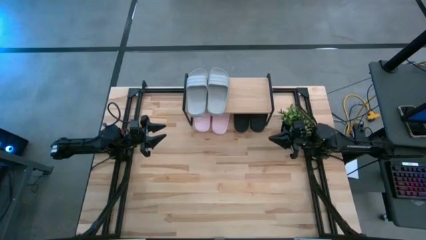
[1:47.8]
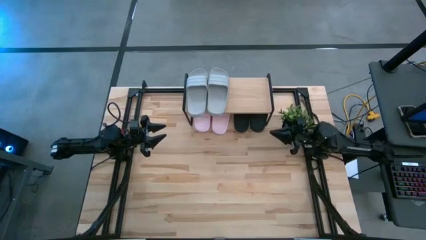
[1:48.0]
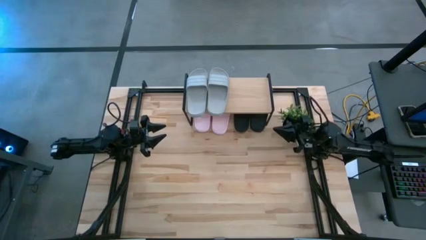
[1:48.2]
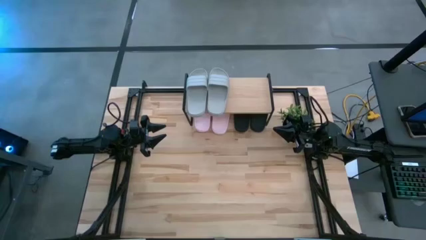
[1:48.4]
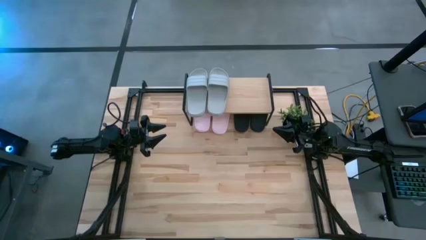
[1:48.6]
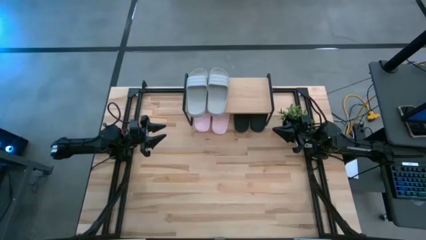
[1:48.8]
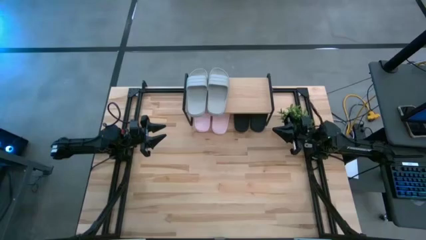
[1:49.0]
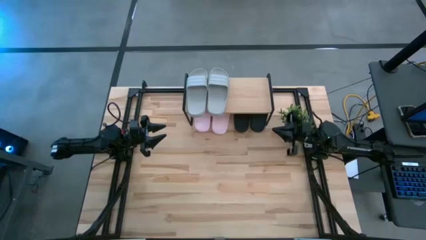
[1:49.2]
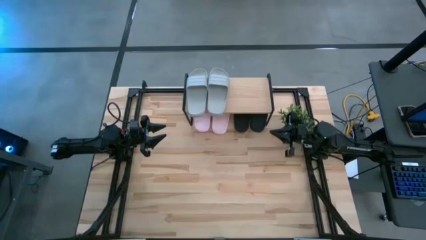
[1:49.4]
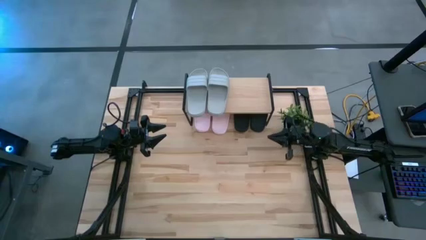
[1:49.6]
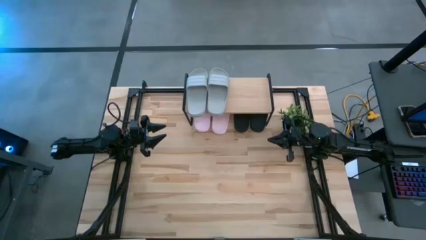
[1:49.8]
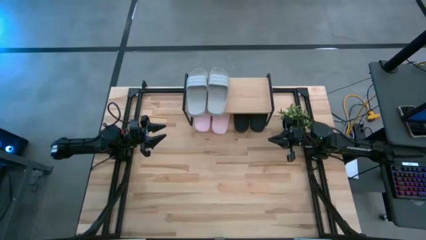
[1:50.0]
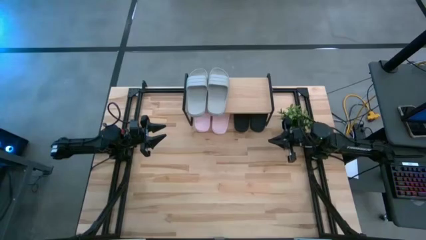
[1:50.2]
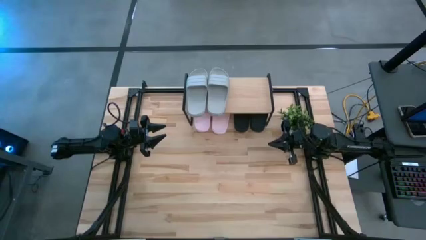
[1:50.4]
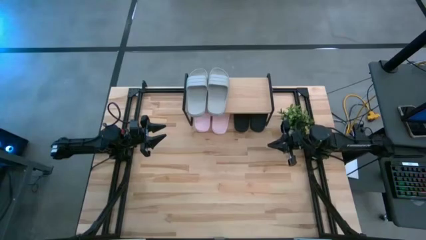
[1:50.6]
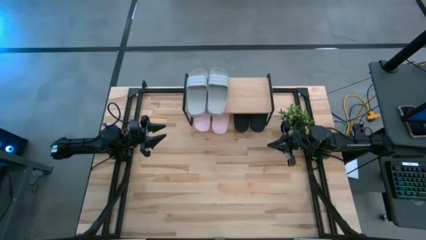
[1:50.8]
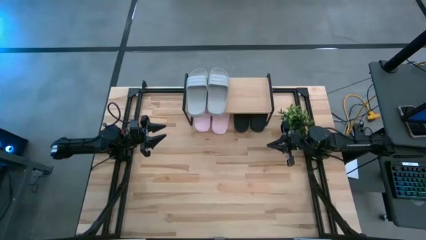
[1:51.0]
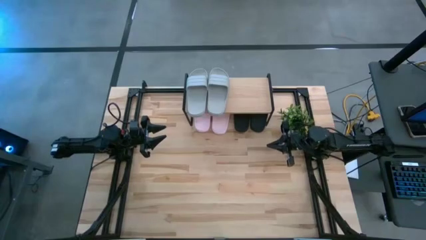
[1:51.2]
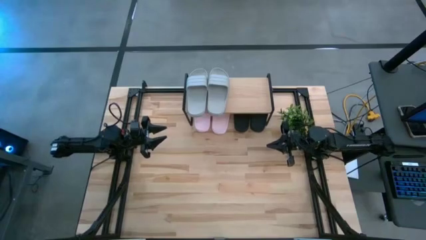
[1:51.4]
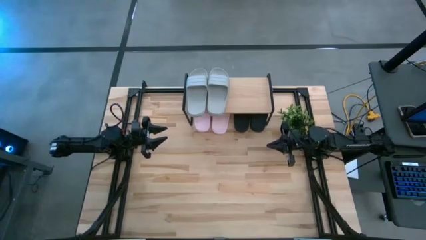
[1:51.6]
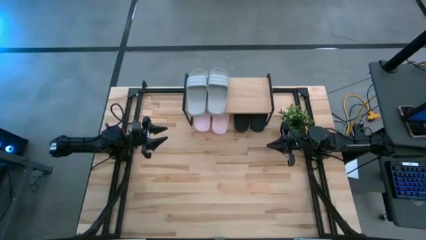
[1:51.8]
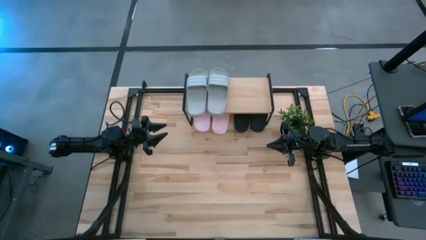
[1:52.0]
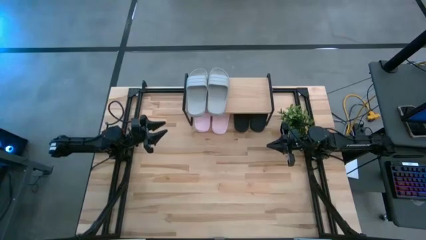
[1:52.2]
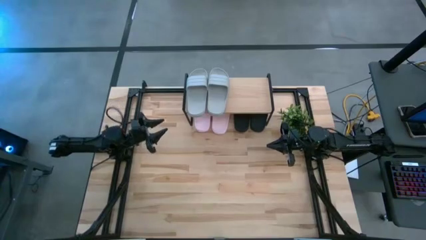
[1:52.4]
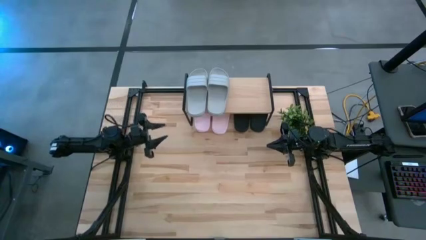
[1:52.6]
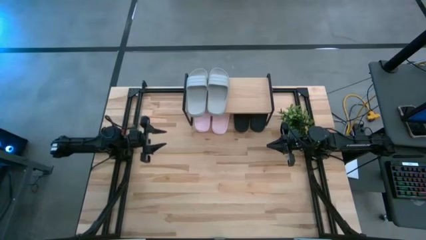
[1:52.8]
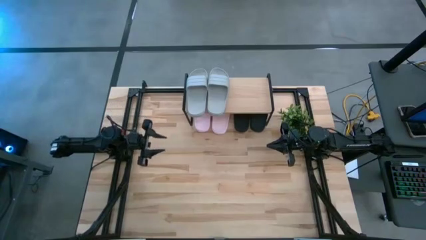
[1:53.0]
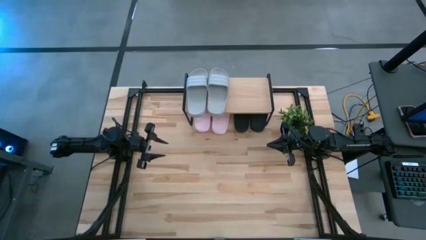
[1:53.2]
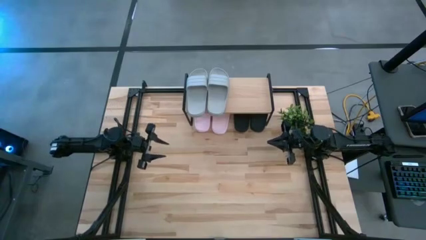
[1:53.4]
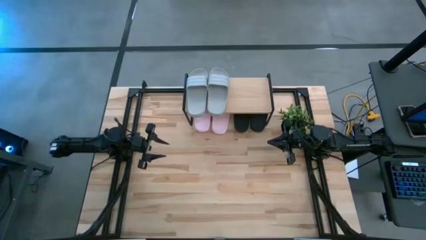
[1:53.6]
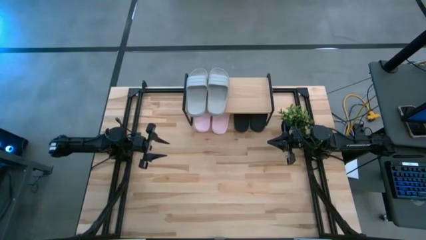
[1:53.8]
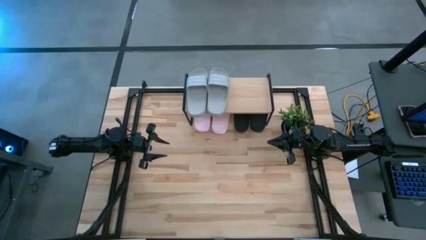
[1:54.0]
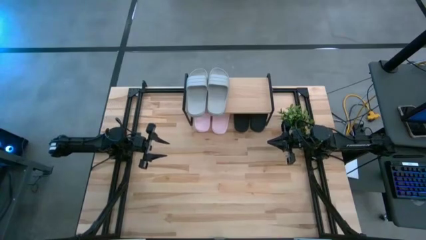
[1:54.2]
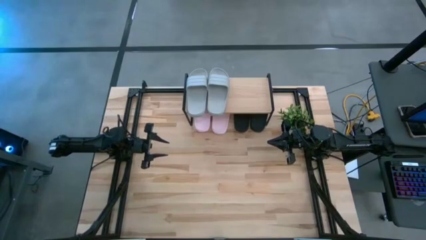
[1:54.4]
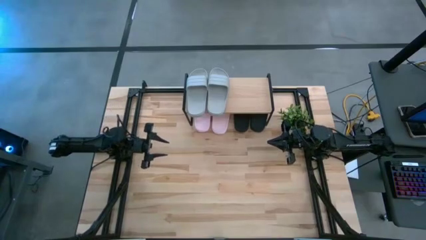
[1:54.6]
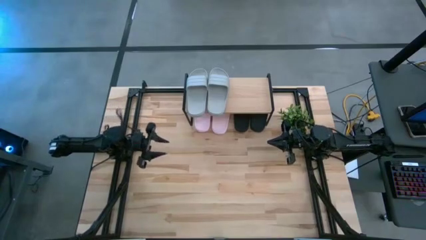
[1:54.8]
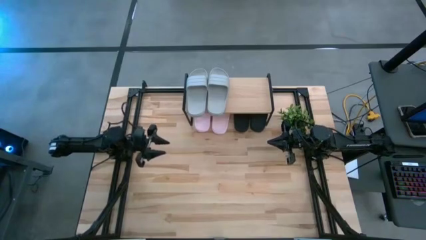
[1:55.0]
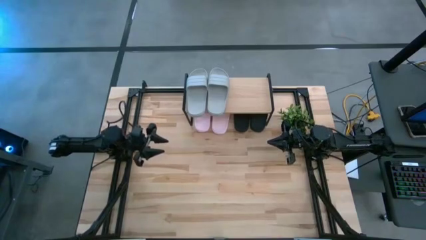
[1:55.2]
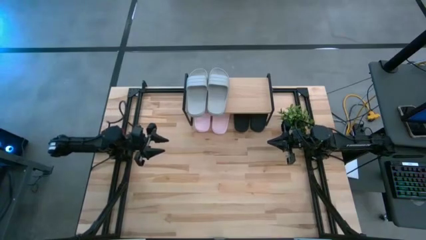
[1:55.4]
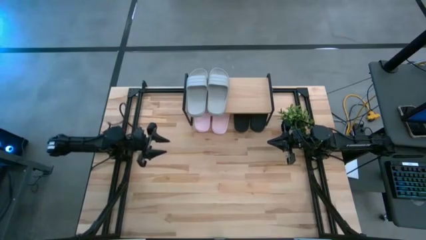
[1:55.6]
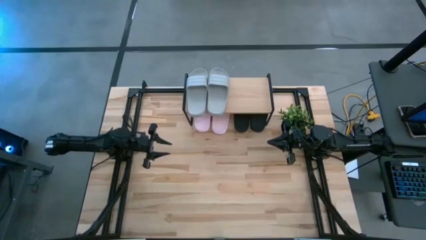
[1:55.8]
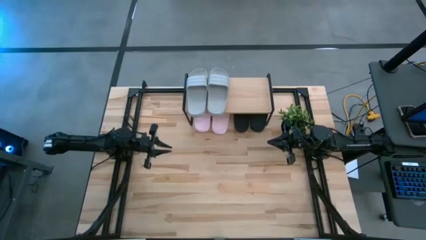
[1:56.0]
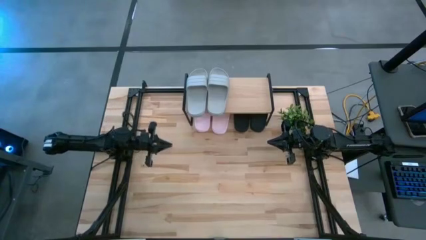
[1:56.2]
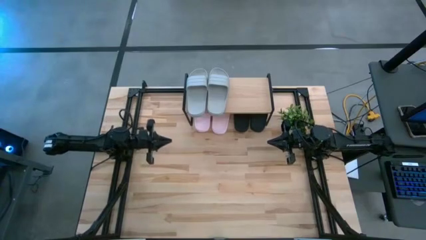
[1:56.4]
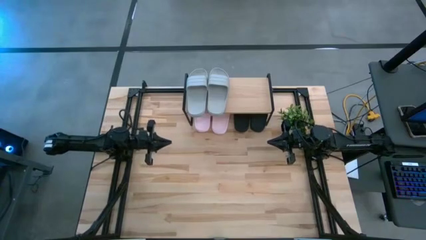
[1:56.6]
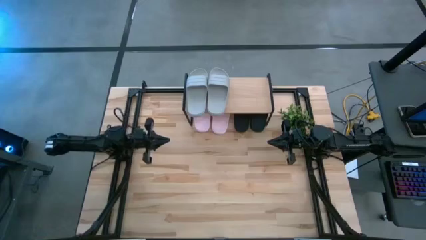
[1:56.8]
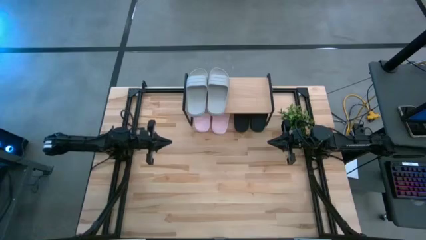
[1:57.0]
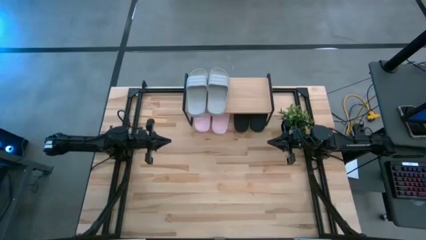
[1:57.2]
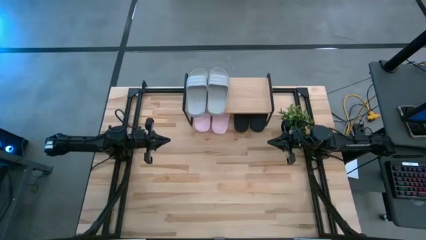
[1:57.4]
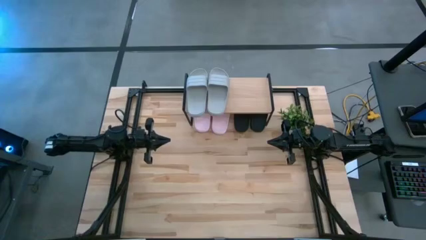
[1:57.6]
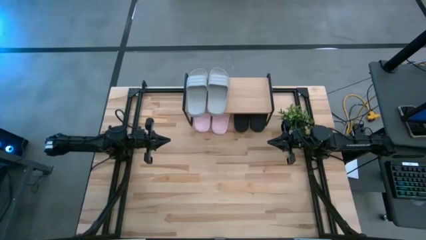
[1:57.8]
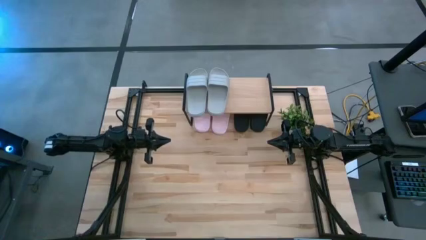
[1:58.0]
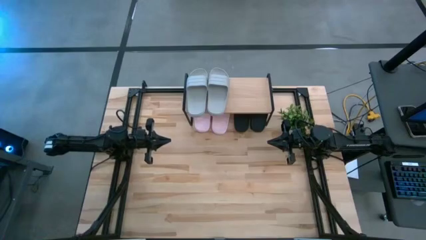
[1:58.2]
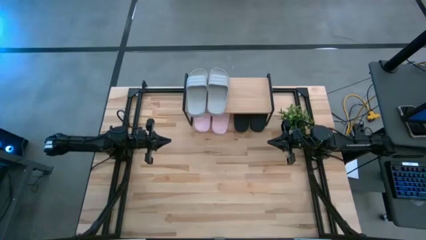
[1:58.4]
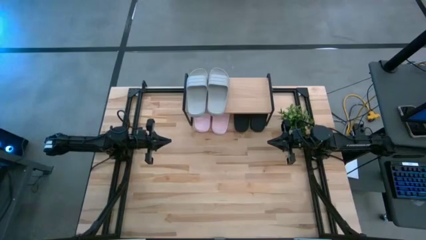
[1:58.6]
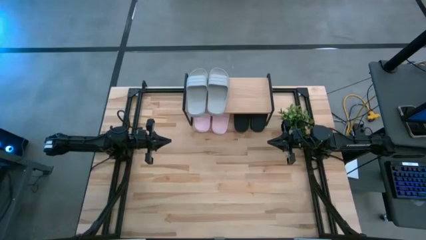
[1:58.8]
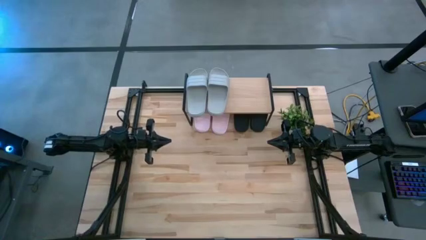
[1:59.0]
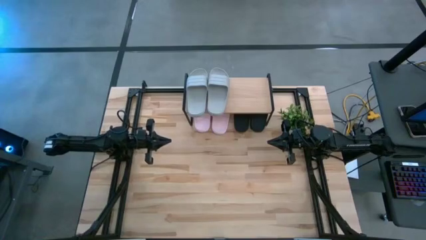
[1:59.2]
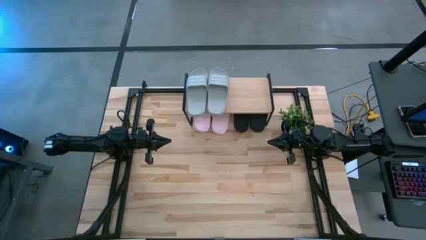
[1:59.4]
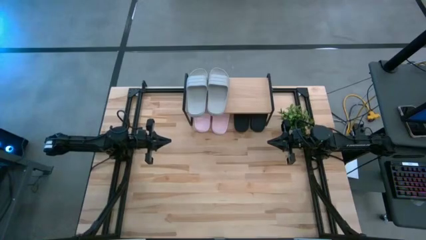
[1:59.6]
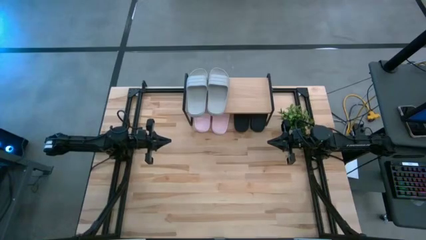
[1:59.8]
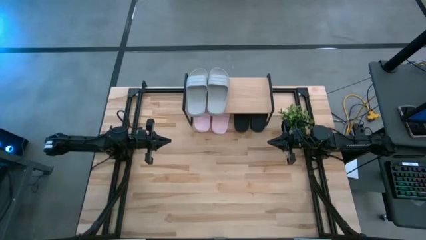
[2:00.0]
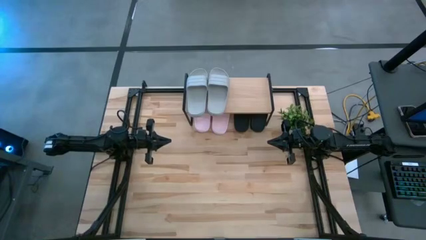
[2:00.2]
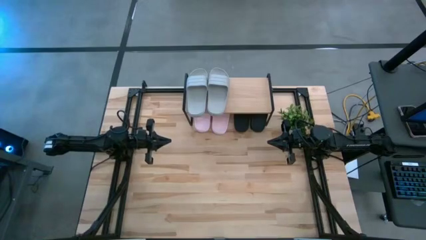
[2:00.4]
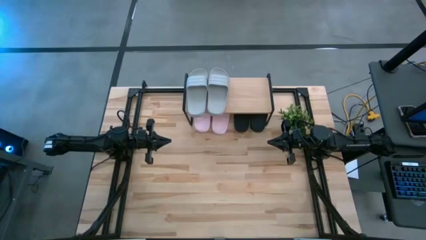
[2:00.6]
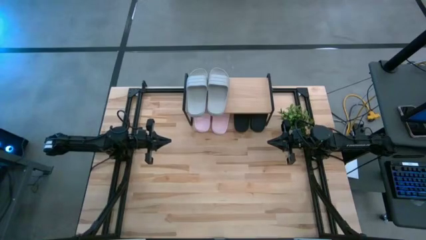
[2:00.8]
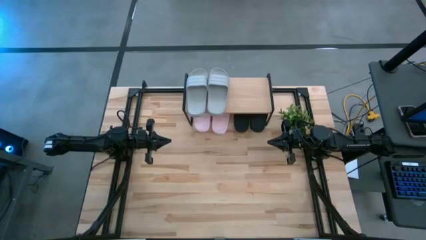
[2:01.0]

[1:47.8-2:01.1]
Task: Pick and place slides into the shelf
Return to Home Position
